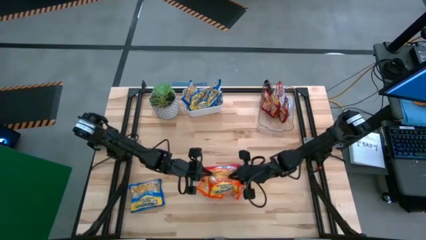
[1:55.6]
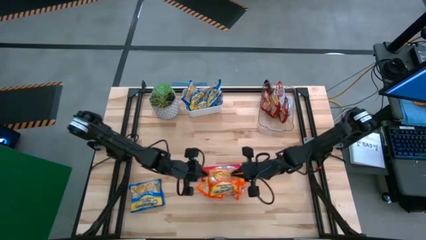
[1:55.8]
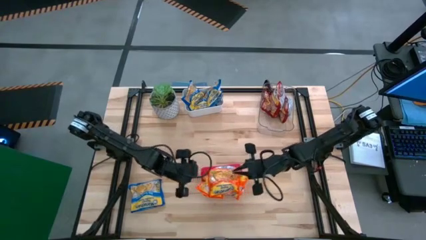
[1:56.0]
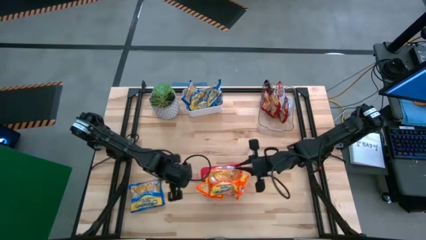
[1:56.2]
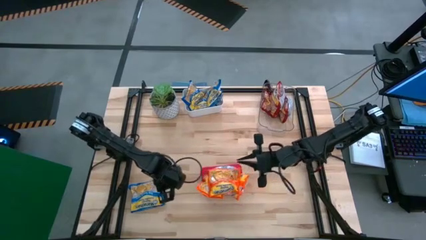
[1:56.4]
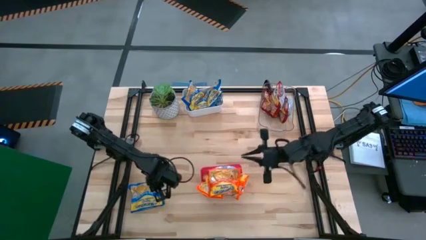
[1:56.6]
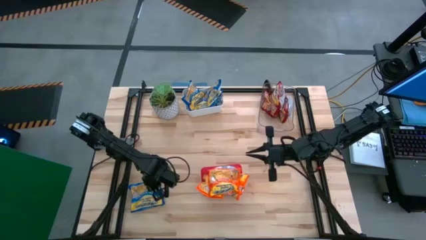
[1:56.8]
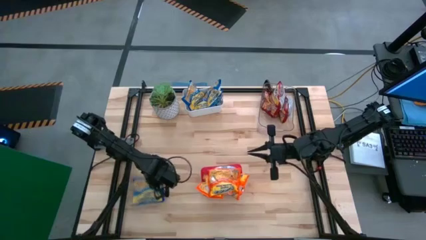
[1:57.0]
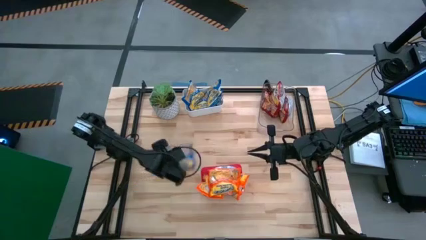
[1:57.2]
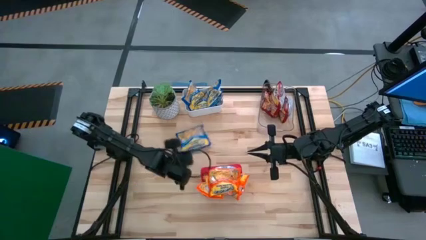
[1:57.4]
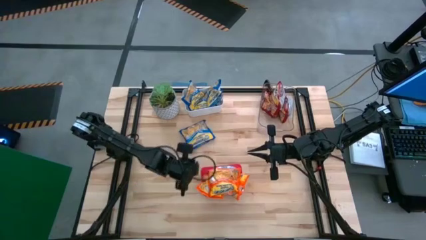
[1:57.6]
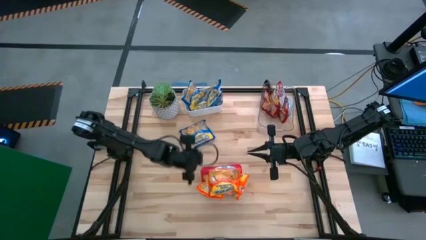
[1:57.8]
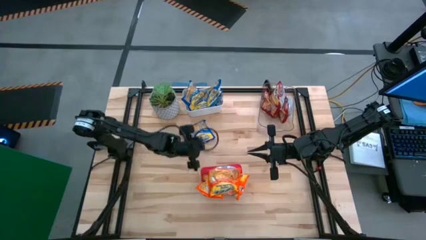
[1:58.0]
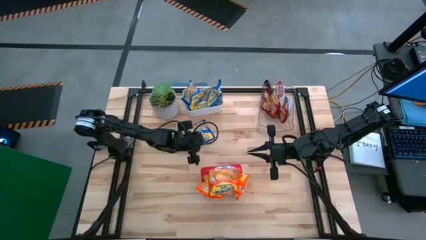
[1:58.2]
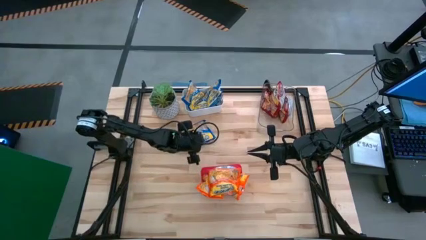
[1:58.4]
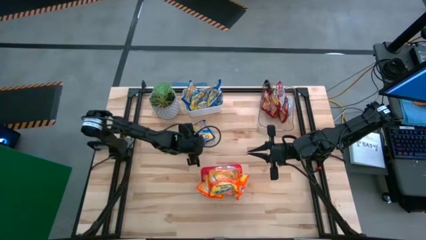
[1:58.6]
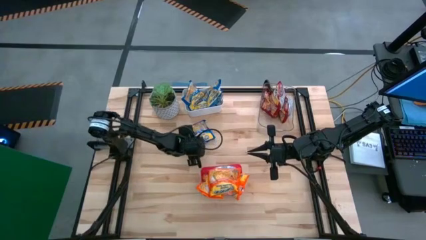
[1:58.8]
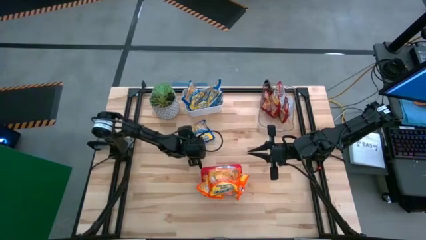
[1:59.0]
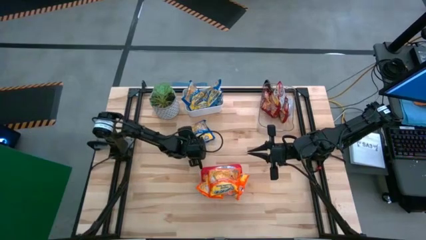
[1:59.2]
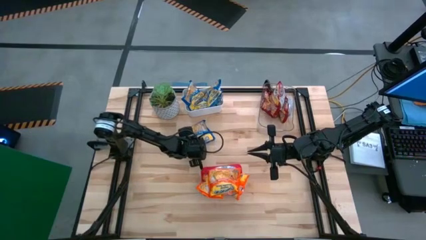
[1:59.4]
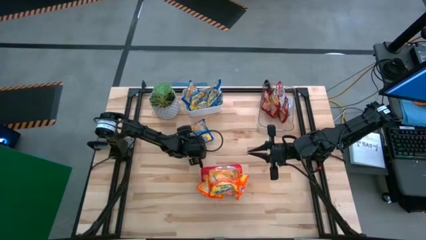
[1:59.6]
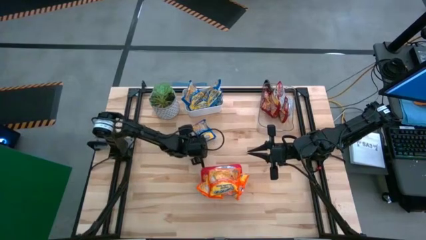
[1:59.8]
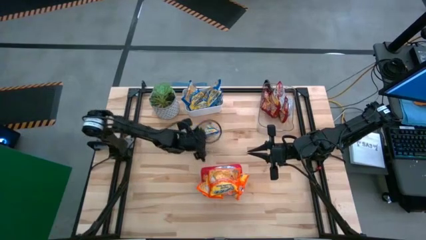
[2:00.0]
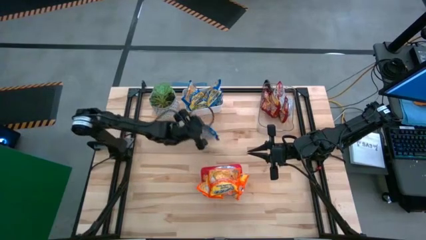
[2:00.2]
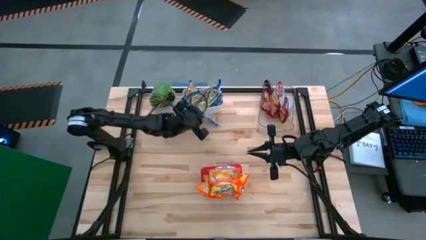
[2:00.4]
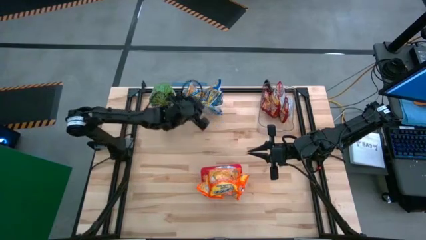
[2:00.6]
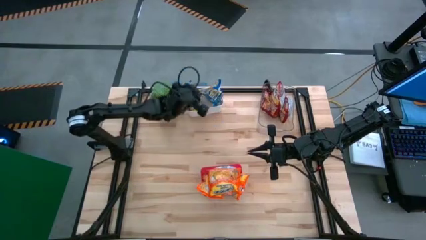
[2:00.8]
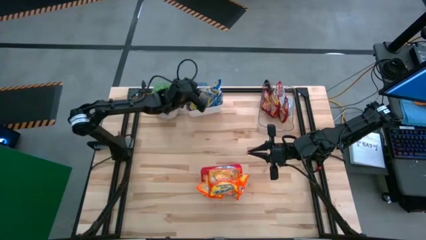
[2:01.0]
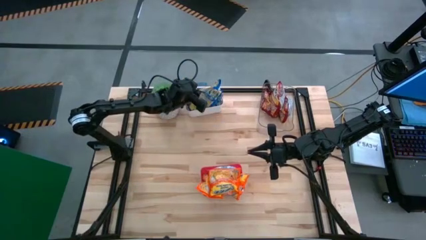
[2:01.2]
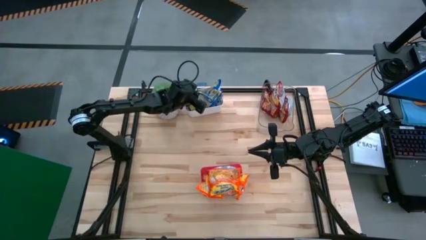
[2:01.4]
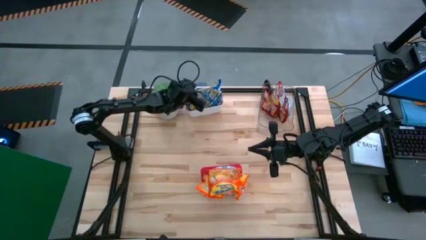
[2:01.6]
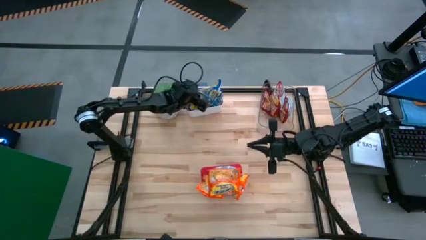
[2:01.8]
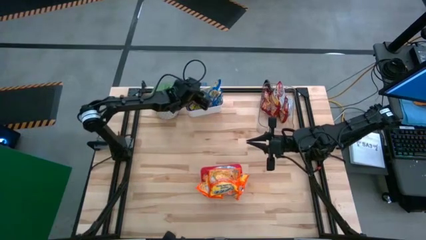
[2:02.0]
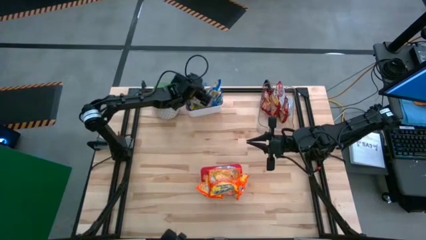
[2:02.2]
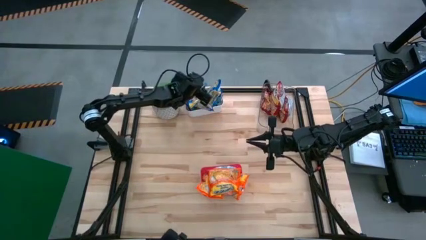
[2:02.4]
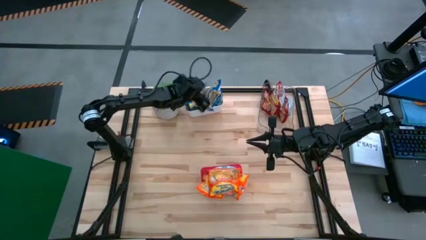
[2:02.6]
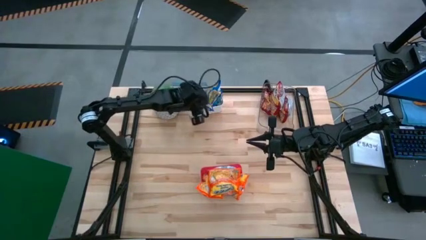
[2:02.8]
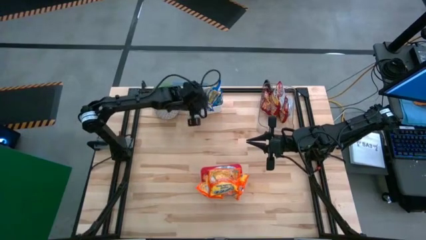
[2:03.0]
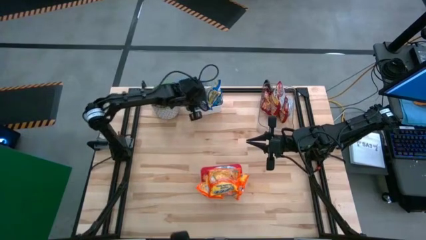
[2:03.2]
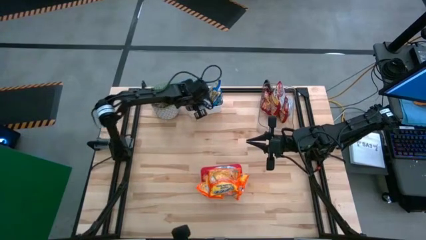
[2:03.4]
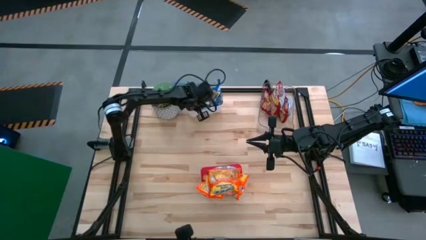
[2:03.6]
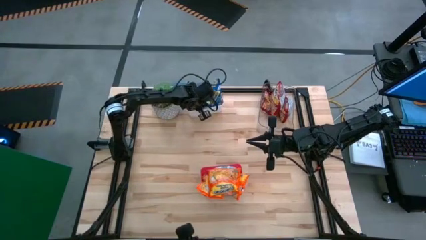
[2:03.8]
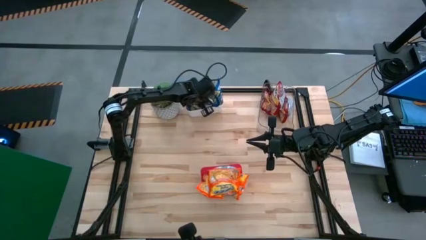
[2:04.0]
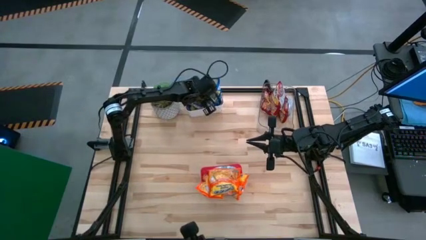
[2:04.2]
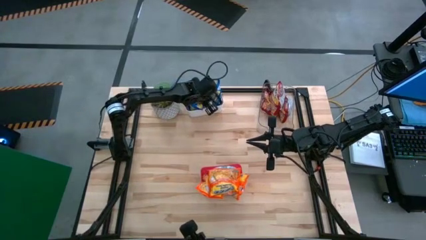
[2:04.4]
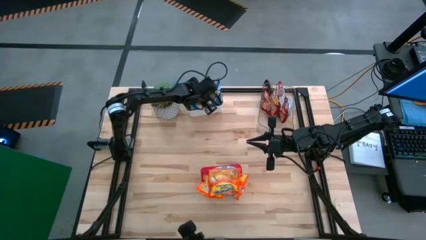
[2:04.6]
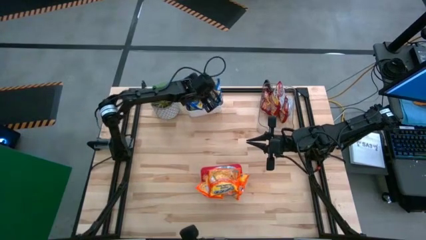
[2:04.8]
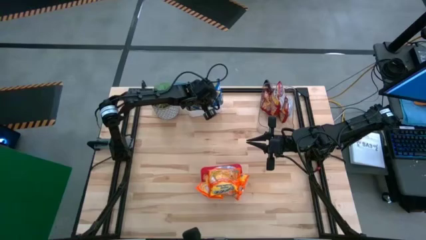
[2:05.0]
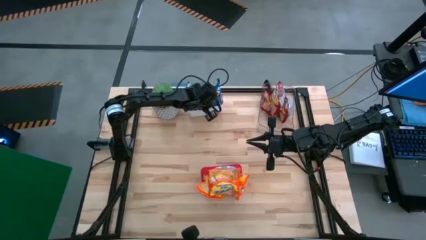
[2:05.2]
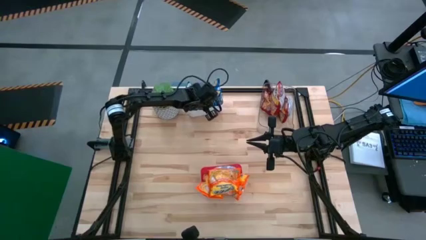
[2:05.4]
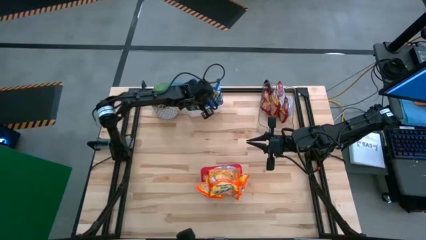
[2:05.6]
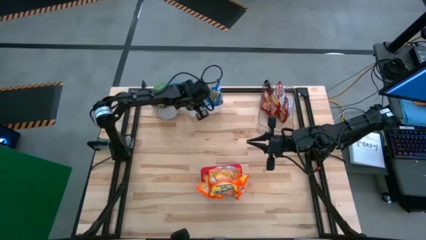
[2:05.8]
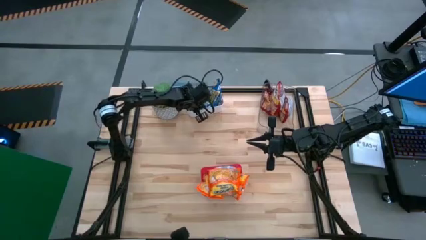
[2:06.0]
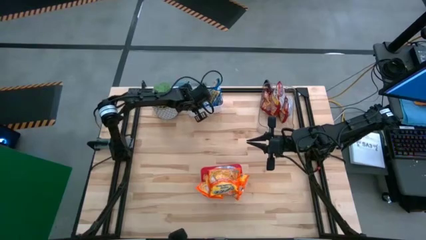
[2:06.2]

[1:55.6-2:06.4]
Task: Sort Maruchan noodles
Put the blue noodle pack into the white bin

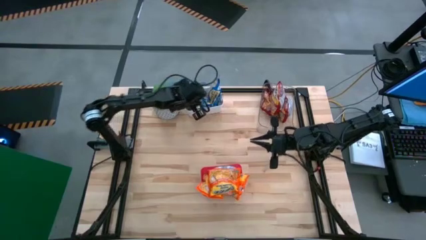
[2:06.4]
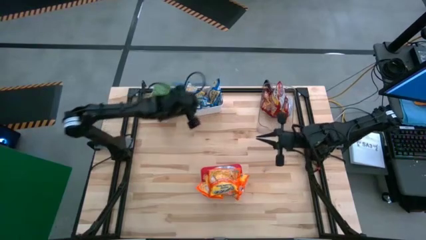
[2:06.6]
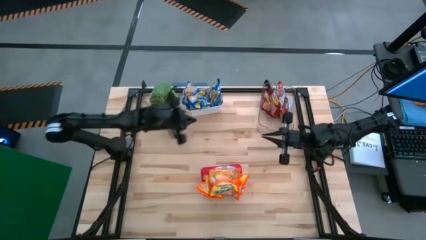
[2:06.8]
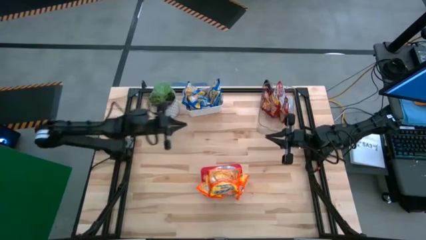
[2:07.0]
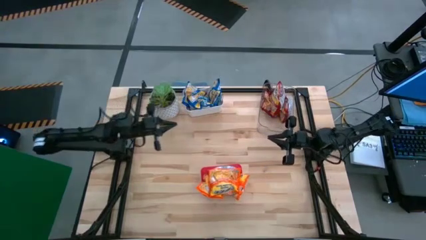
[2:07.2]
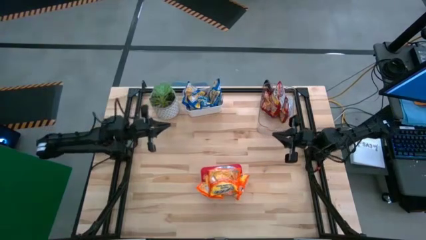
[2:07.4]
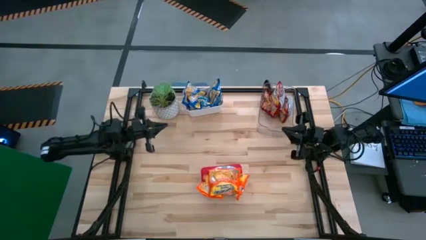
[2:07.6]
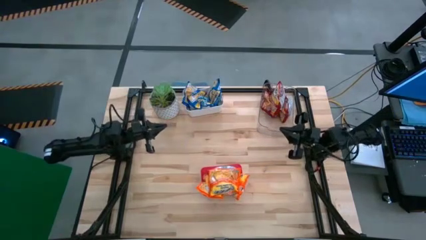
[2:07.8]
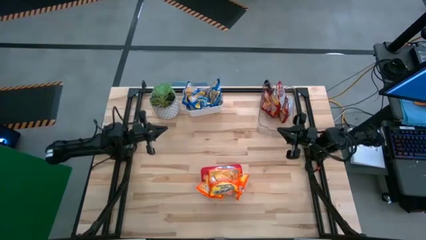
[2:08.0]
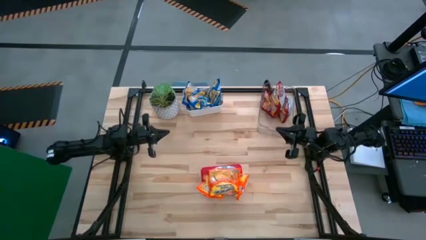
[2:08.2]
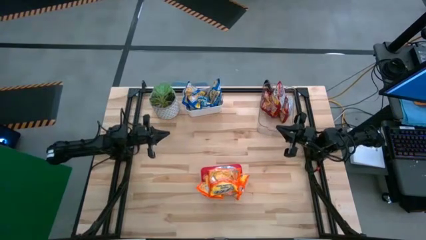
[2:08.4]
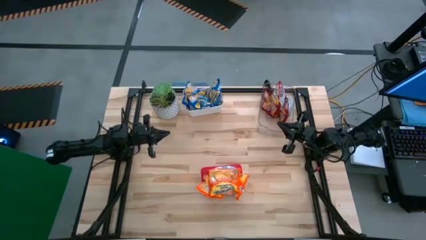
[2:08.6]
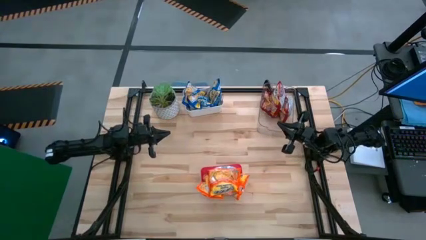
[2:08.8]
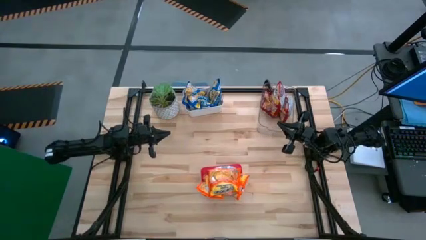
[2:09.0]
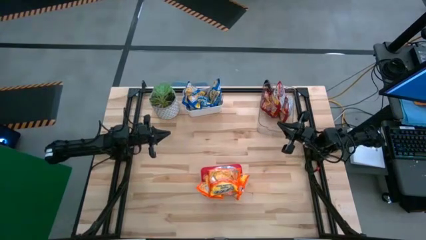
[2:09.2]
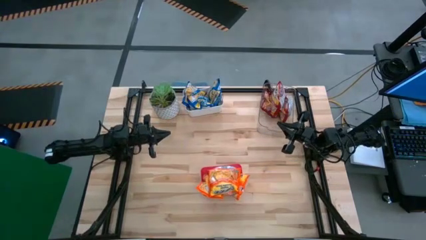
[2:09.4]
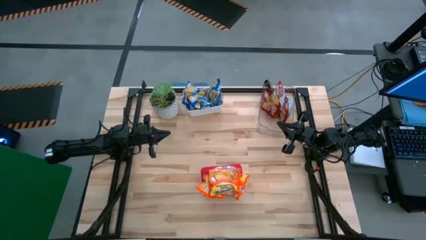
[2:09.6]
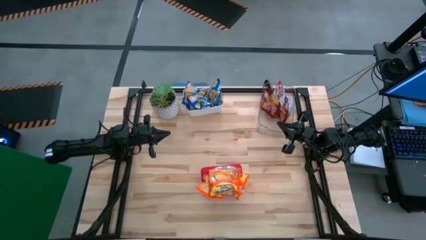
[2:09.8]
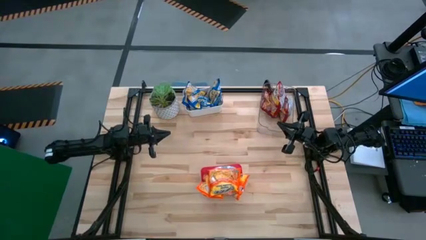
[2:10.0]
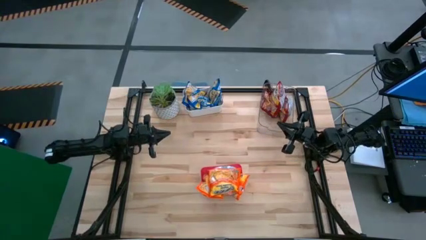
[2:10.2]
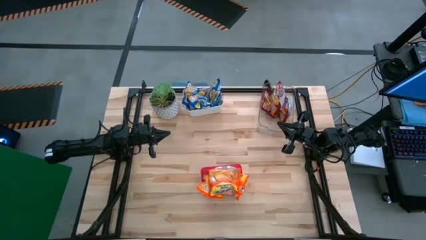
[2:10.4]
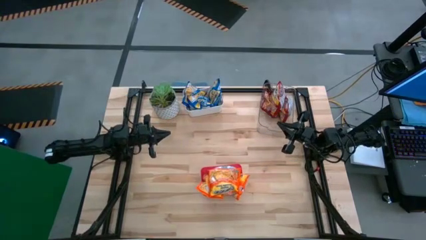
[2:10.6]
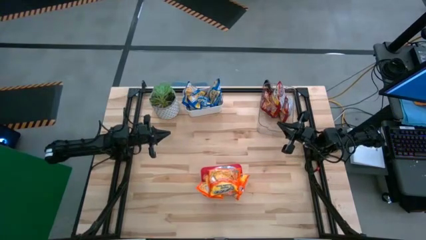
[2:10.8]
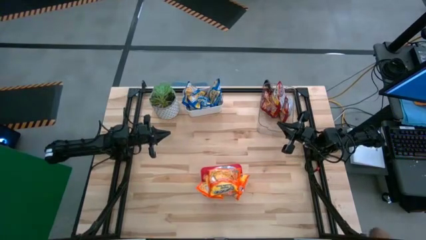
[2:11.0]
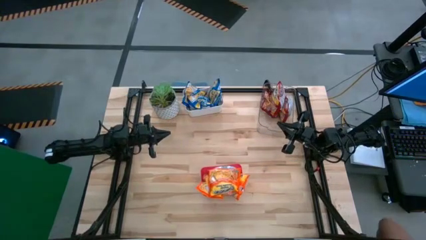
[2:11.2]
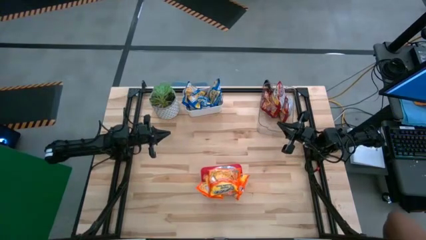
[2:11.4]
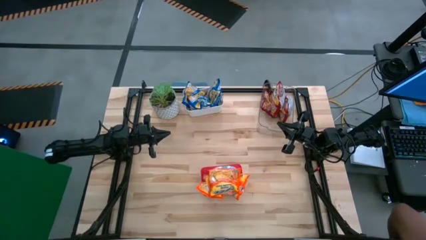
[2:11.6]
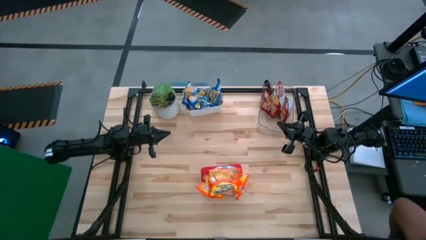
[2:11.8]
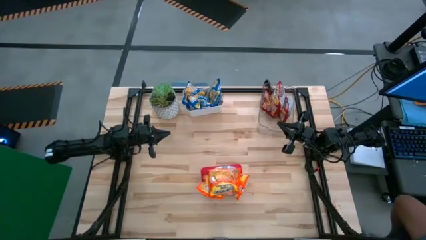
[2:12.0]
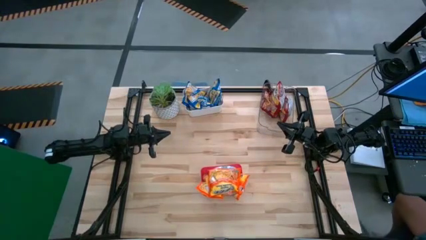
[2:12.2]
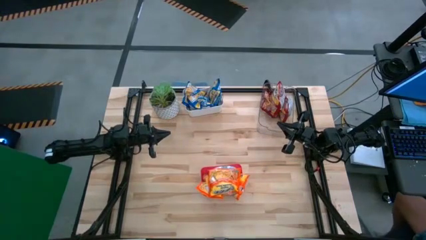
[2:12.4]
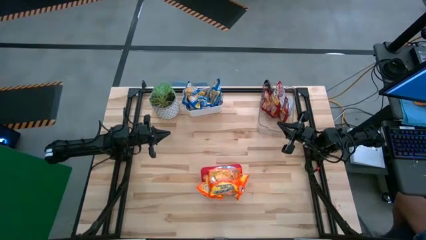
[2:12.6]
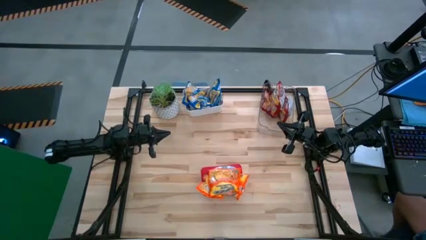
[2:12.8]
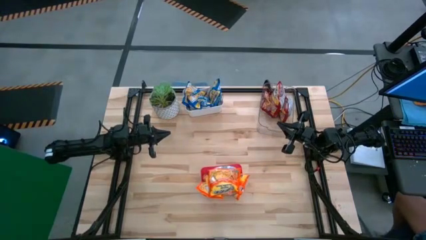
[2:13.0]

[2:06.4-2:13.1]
Return to Home Position
